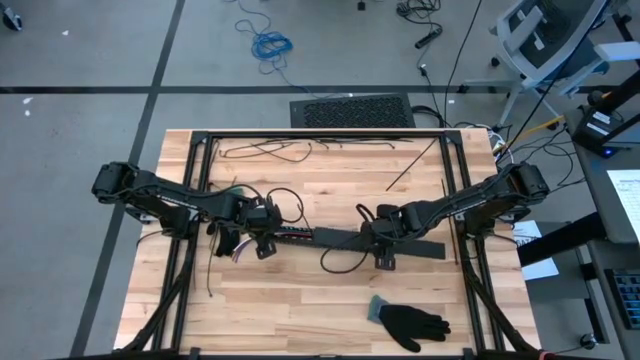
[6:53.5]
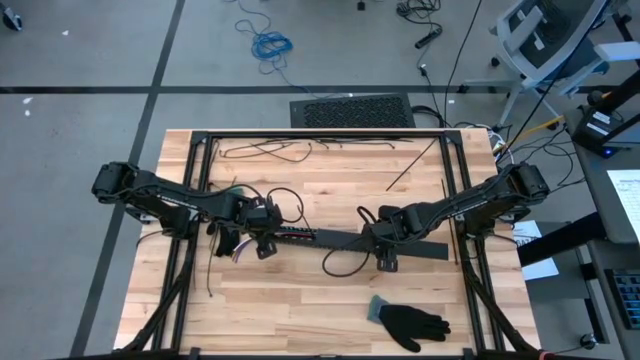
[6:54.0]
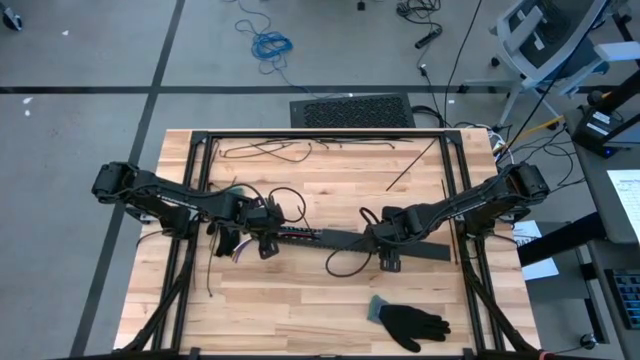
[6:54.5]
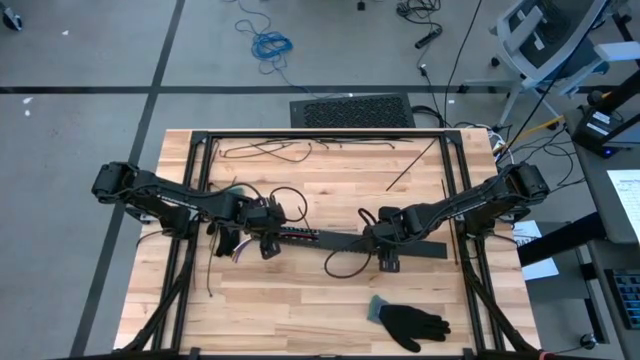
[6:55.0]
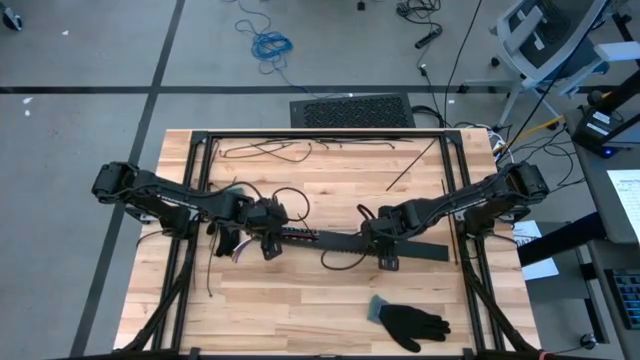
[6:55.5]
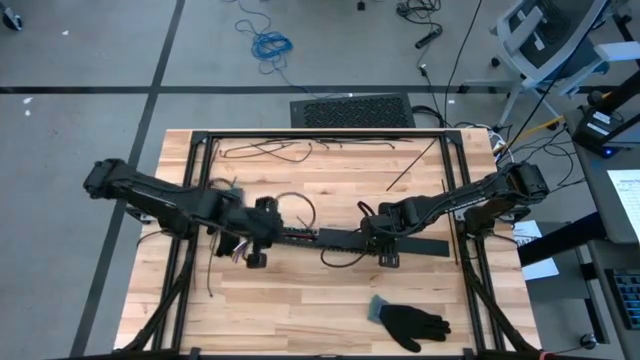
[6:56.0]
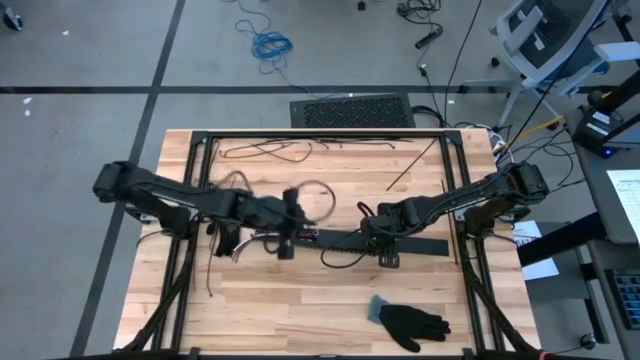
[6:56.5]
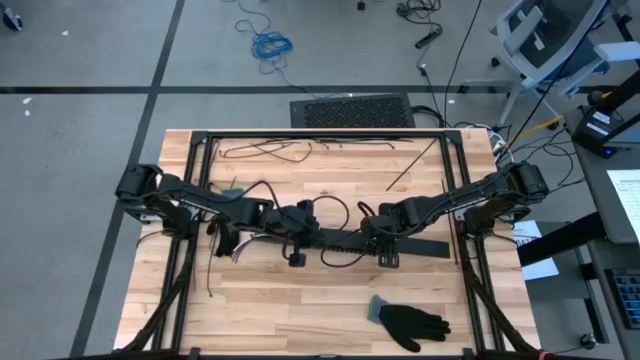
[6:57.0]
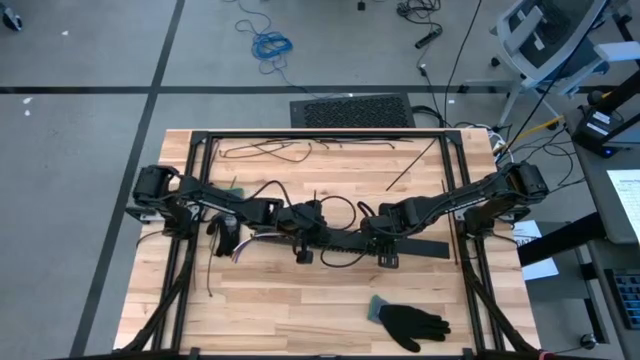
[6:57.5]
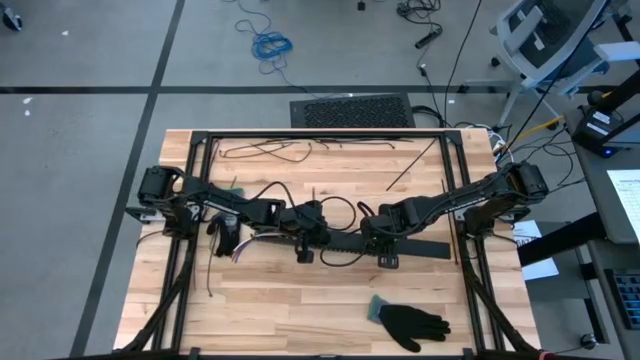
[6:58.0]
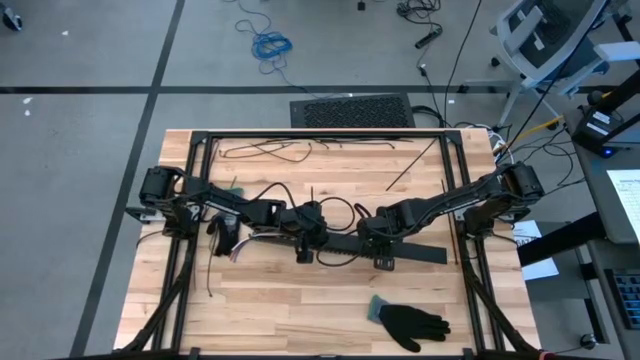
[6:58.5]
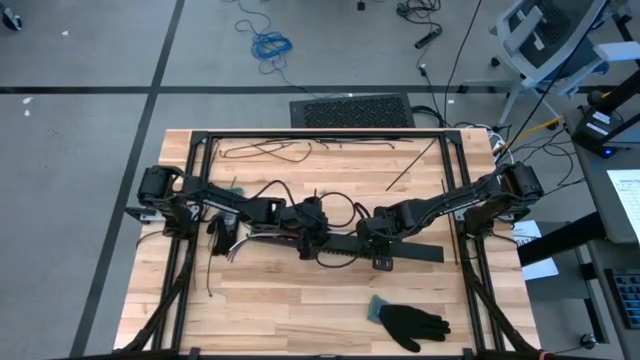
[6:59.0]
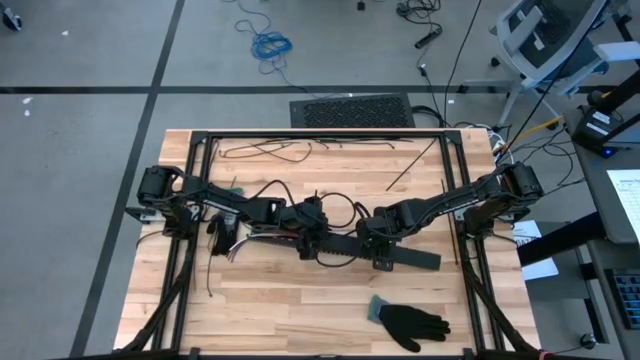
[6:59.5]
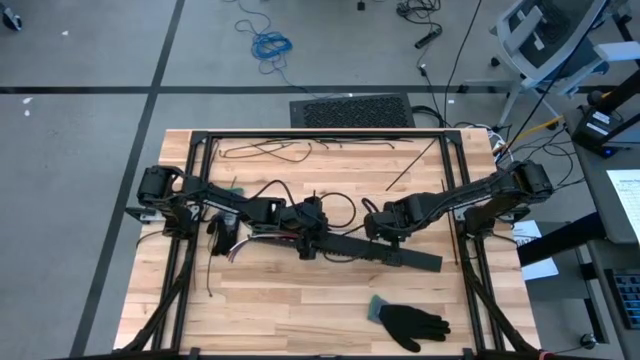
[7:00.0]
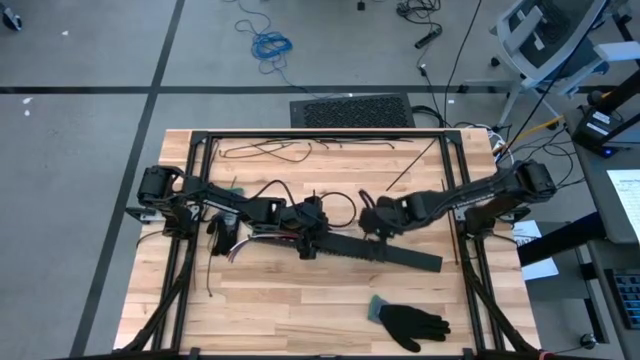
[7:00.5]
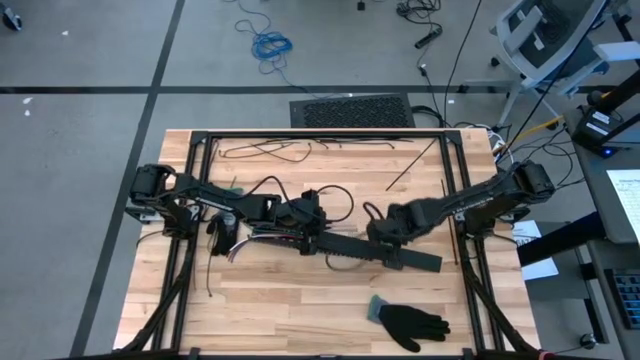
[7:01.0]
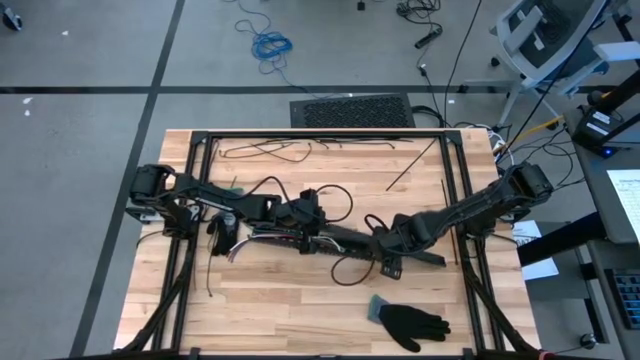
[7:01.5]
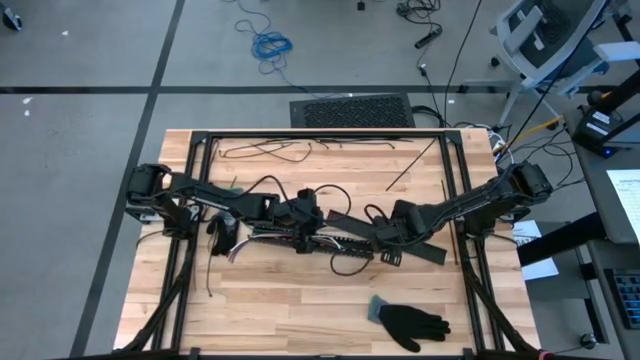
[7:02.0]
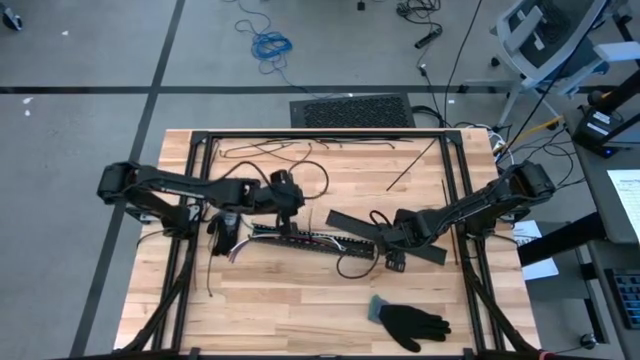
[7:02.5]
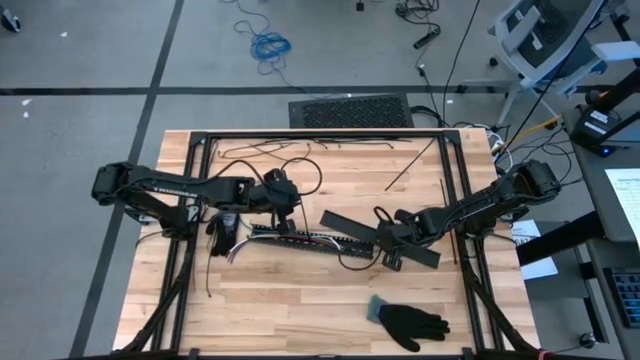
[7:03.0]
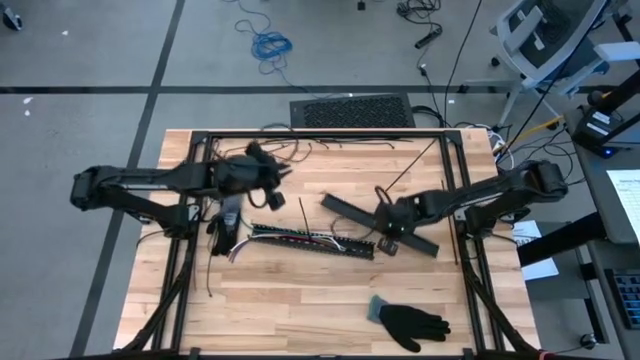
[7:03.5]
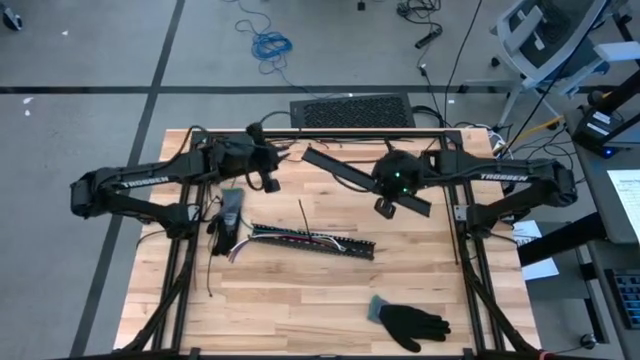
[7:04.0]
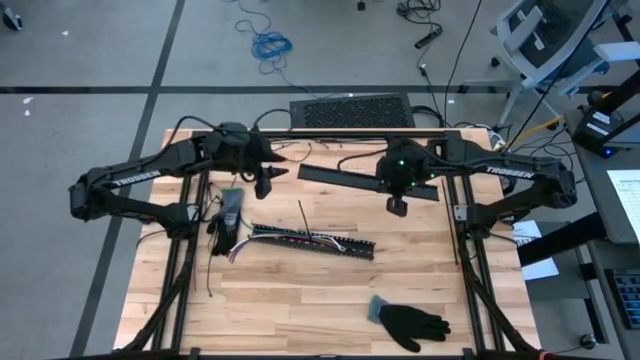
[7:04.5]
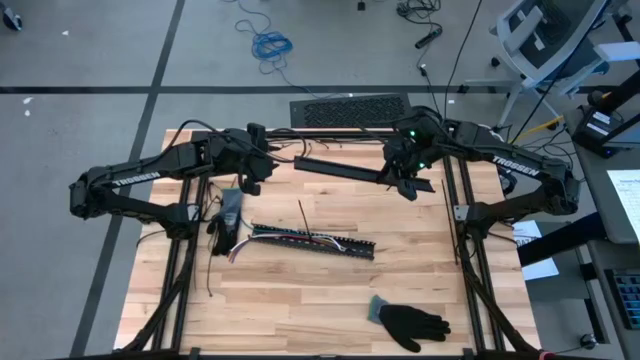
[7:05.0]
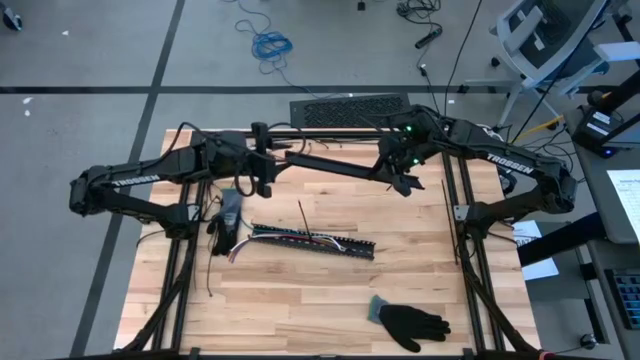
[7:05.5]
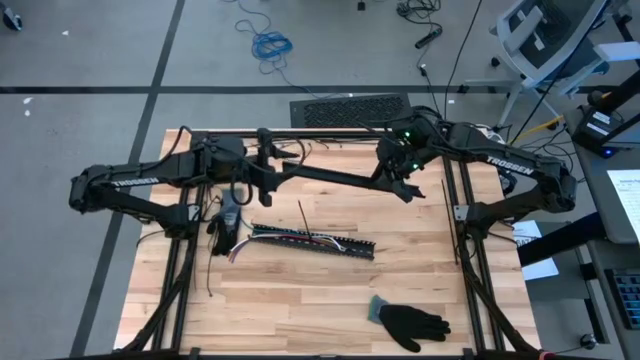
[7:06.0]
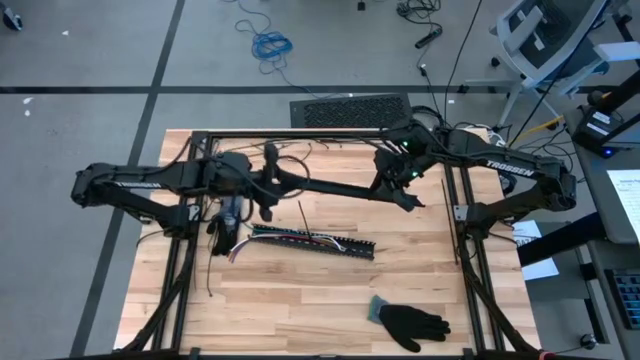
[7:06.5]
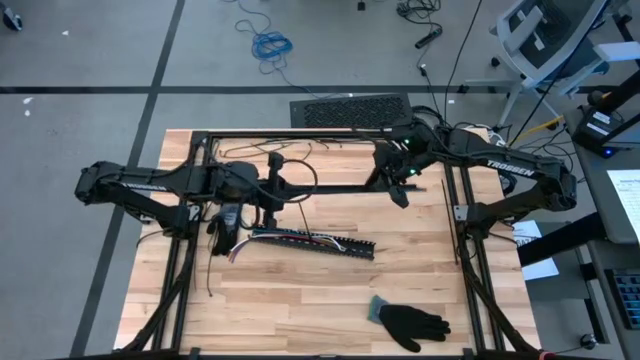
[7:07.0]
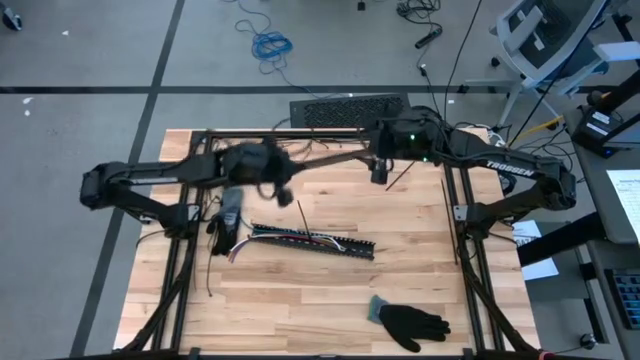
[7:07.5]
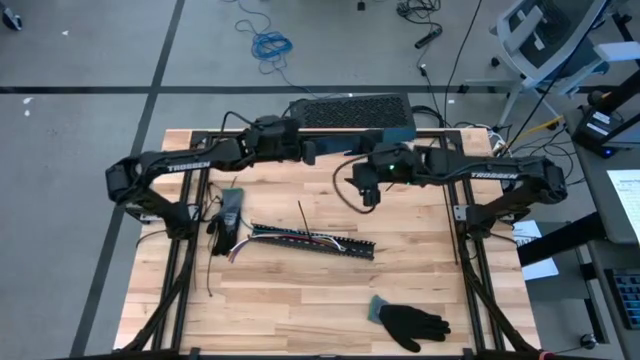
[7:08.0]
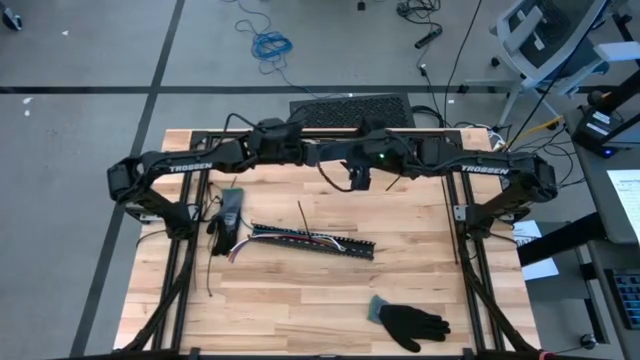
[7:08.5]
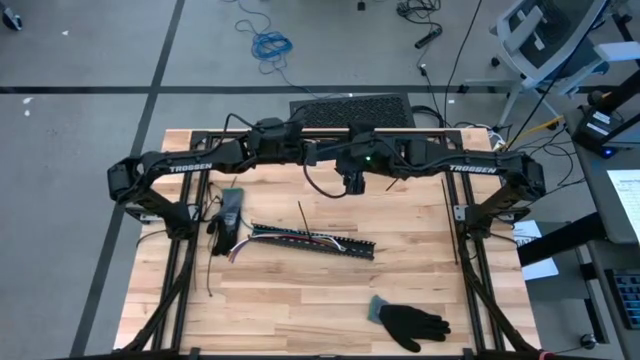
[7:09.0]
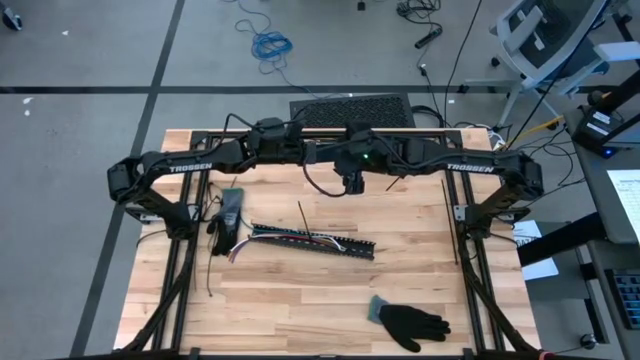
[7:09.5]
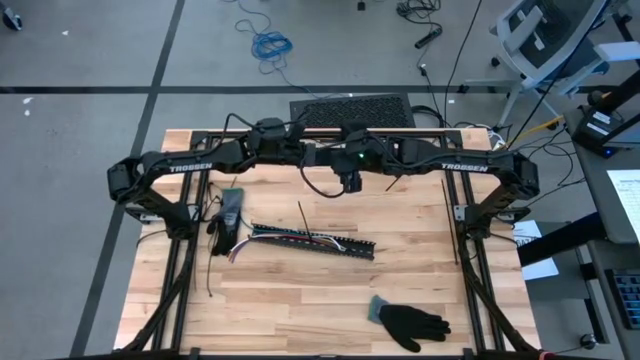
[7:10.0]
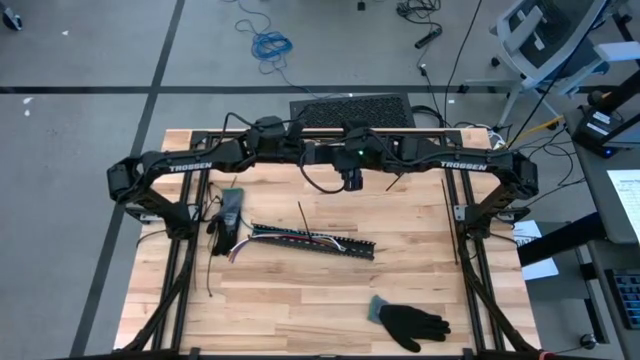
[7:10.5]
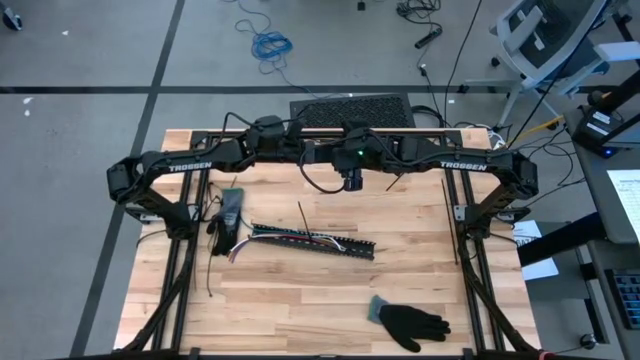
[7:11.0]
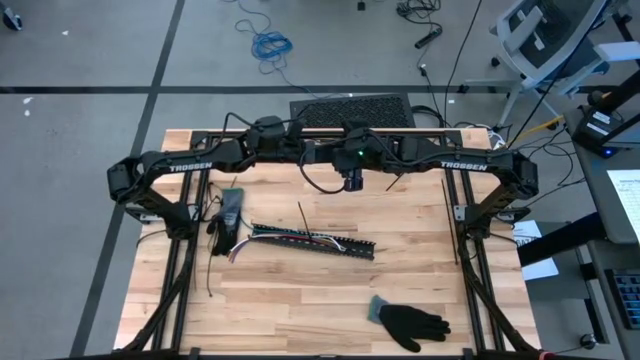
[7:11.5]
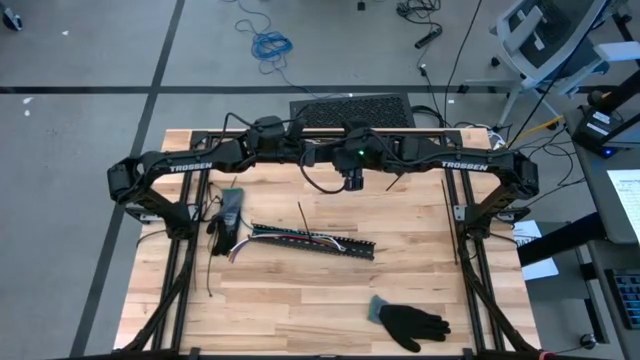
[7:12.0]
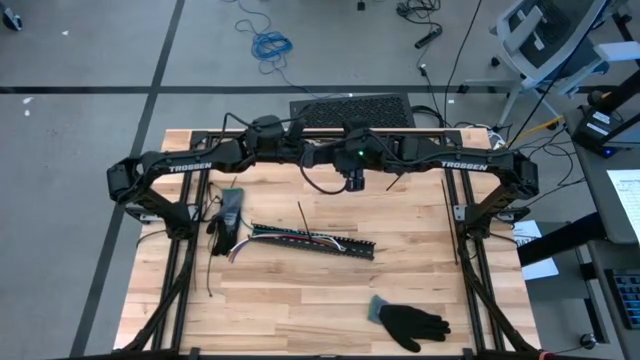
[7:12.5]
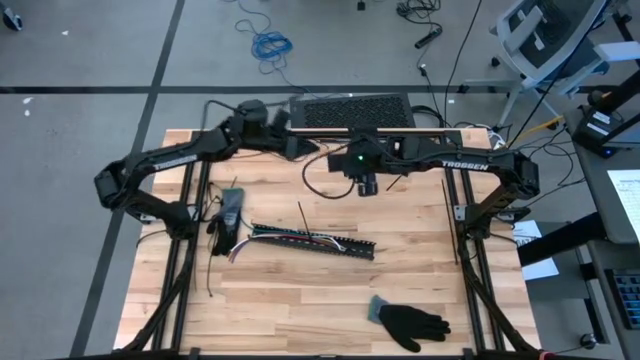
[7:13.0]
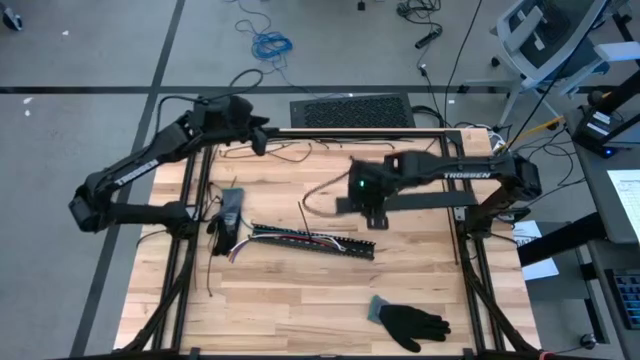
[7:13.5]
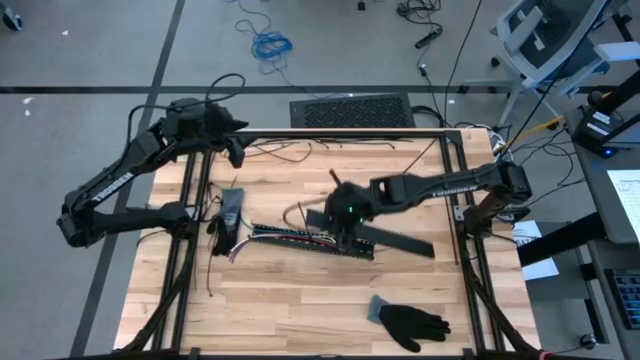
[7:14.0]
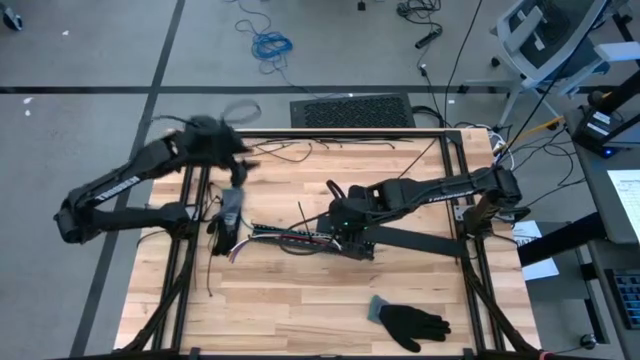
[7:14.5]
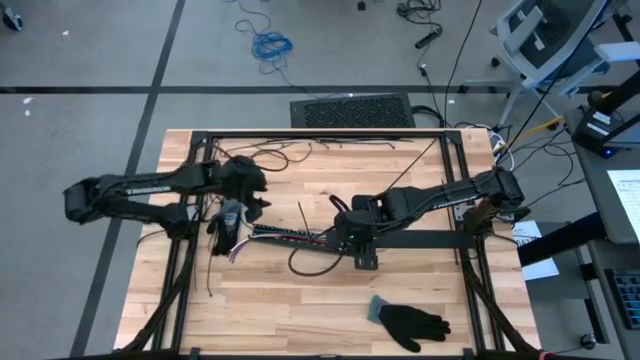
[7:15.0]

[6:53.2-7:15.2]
Task: Ziptie cables
Close the cable duct with the cable duct cover
